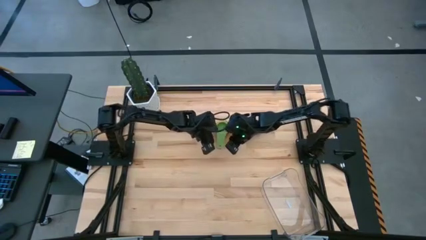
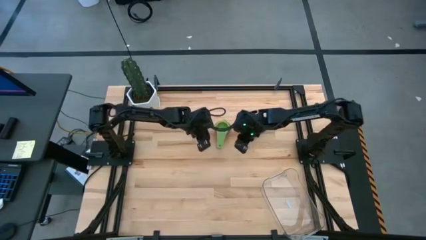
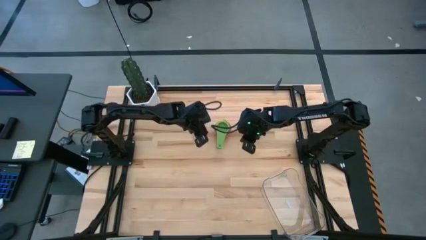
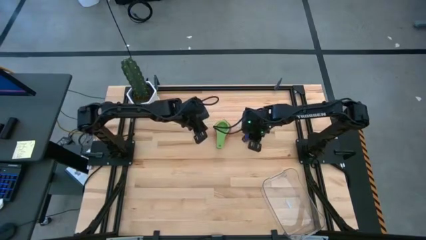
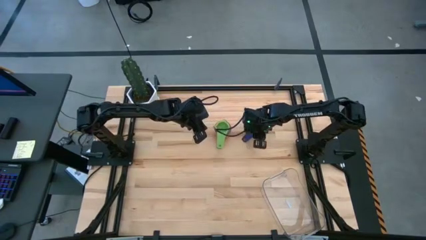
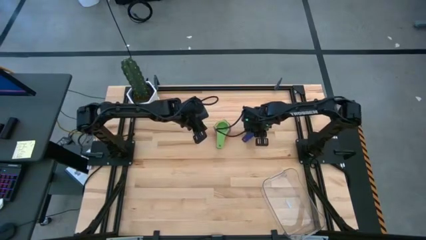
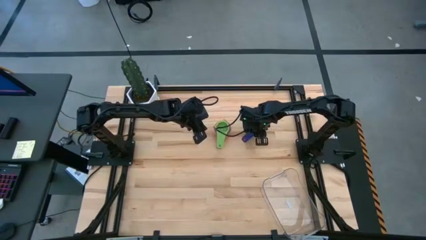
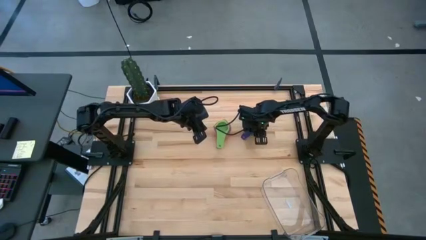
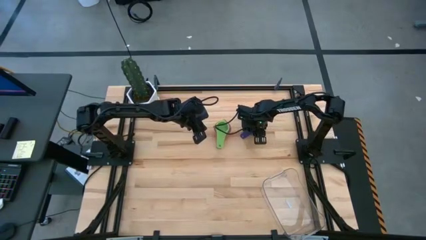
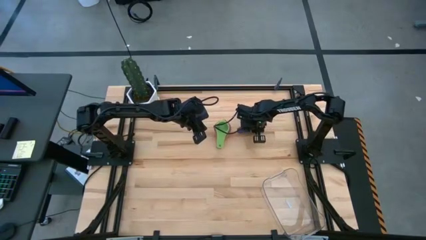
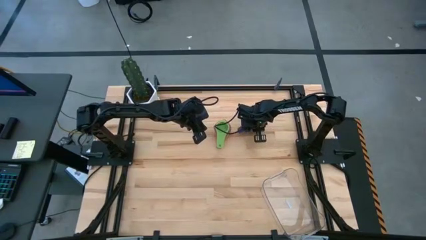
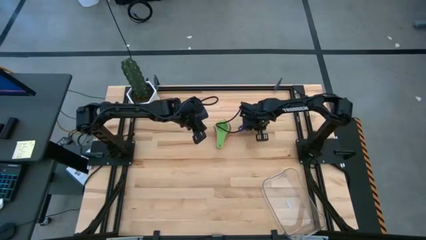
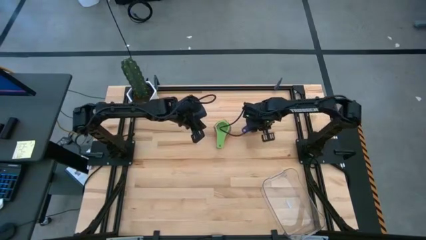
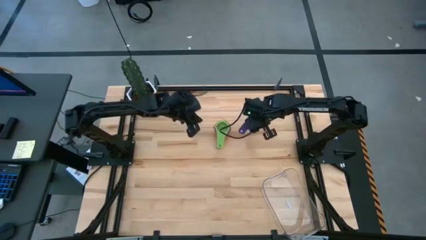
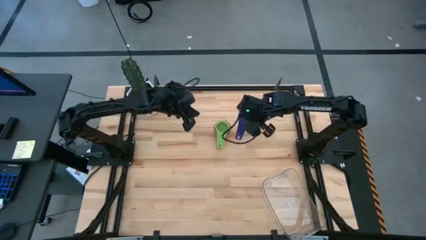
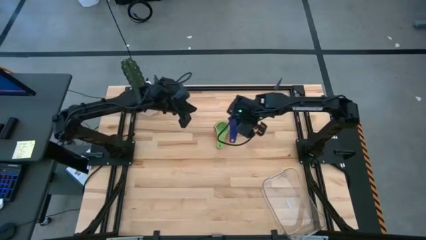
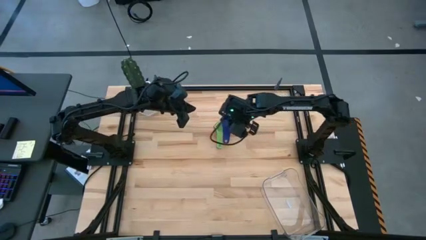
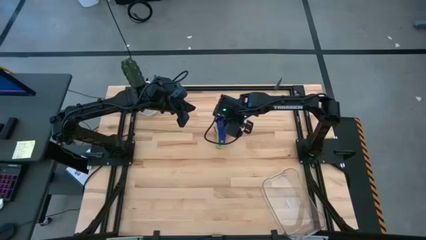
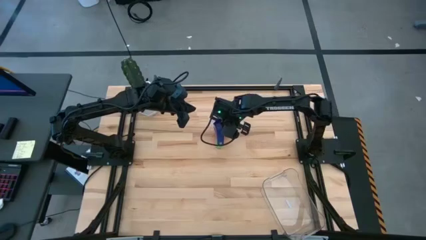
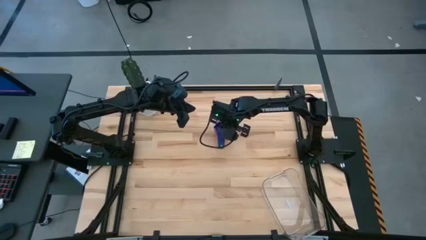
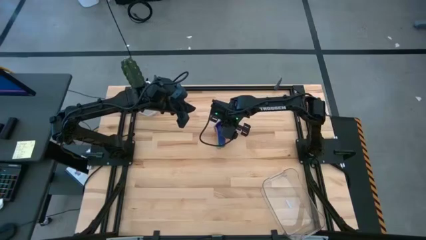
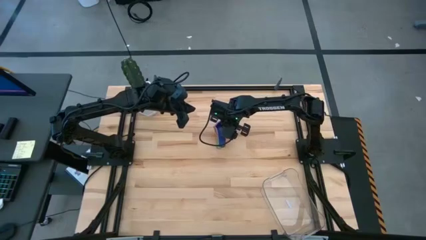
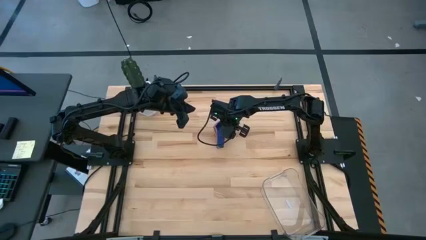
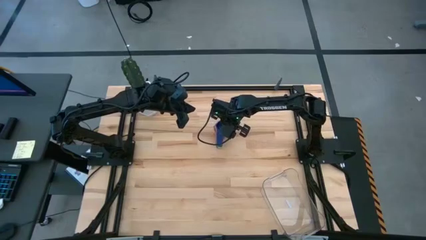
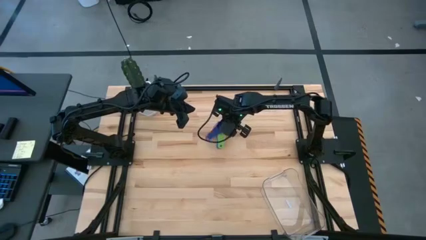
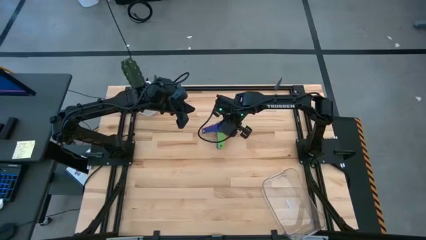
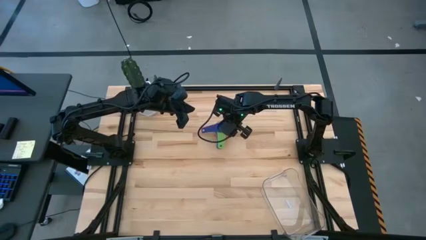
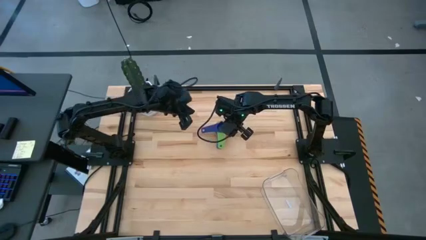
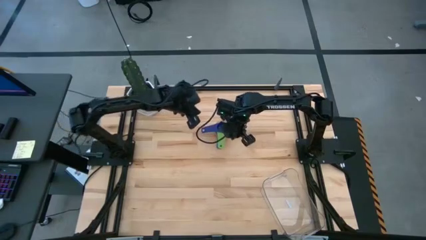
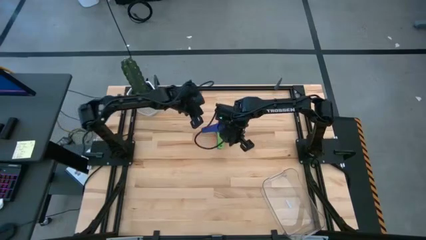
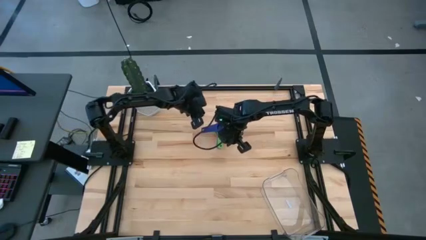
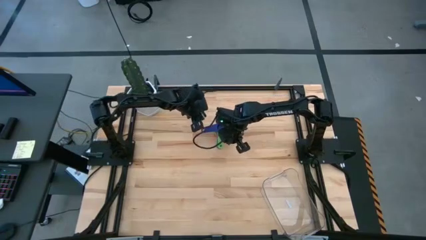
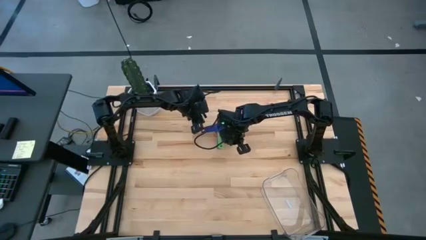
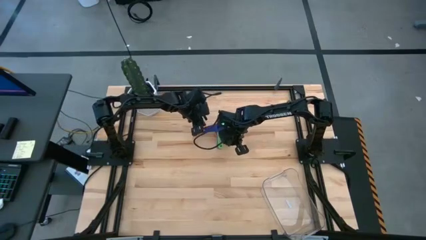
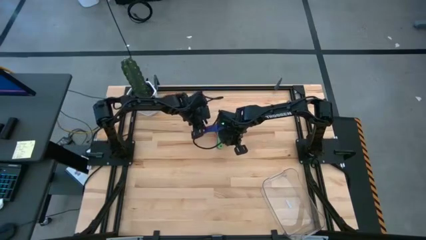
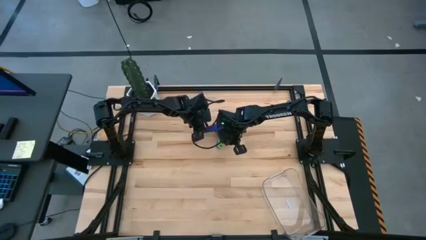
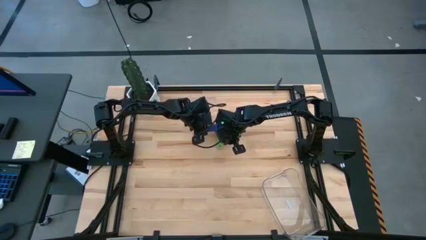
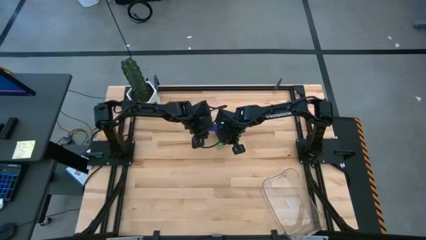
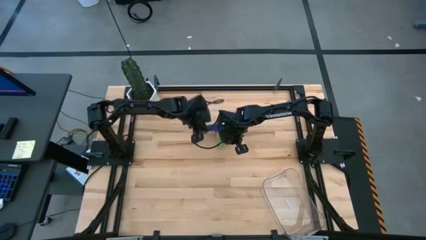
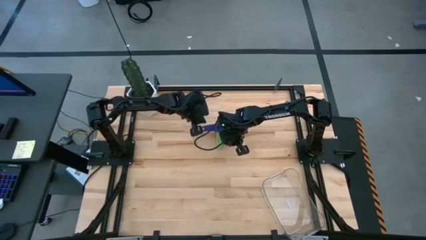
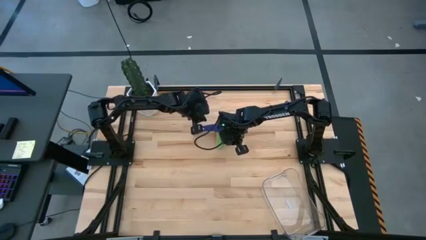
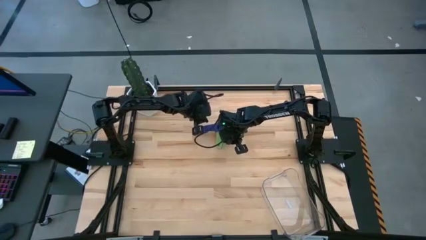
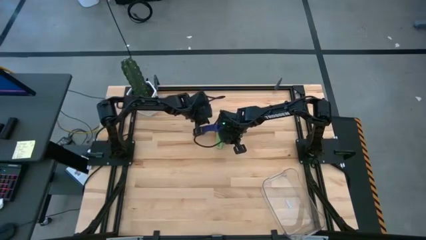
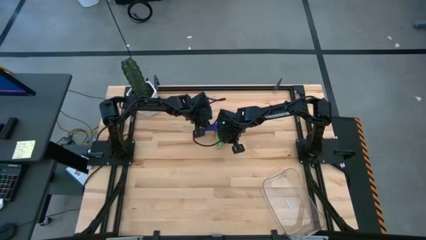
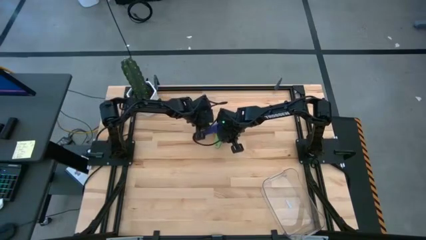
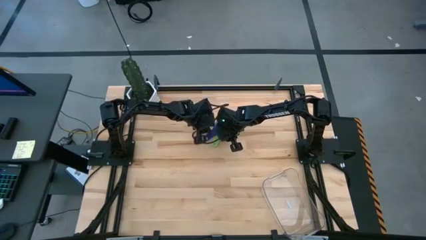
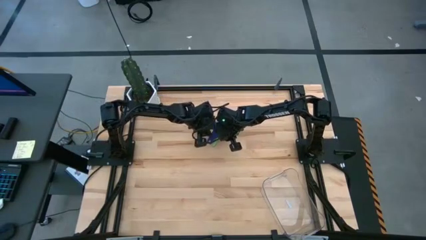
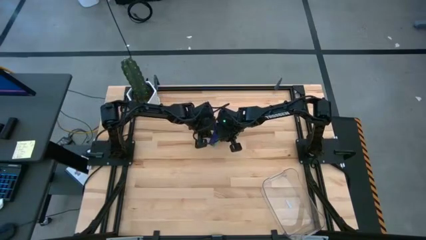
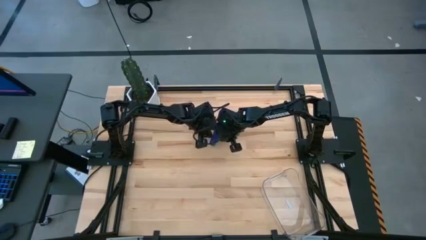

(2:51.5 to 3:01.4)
Task: Nest measuring cups in basket
Stack the violet measuring cup on top of the green measuring cup
